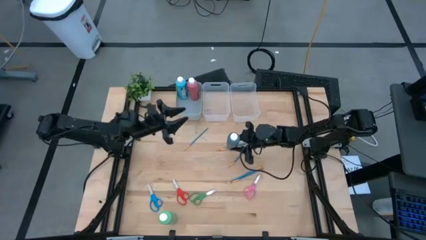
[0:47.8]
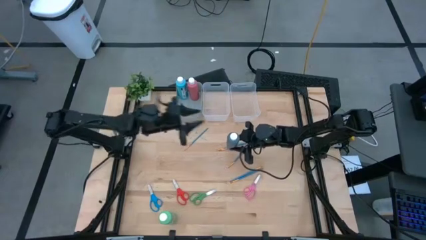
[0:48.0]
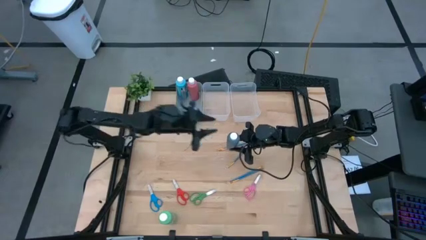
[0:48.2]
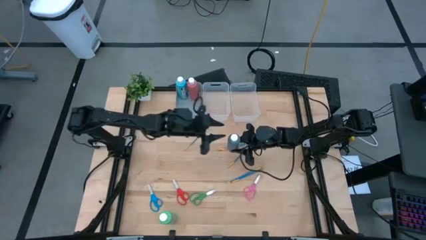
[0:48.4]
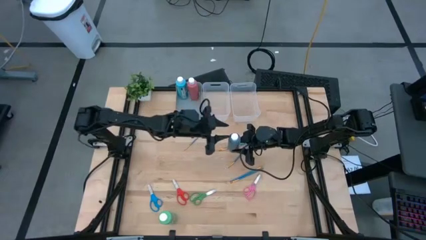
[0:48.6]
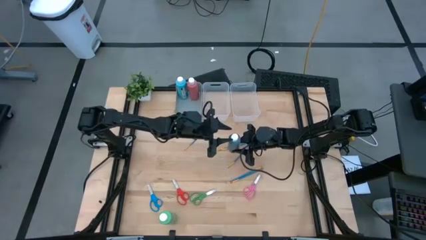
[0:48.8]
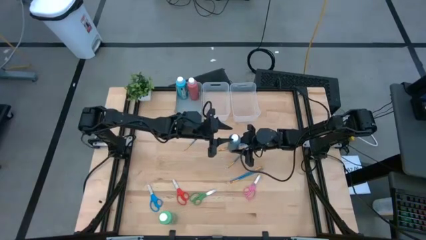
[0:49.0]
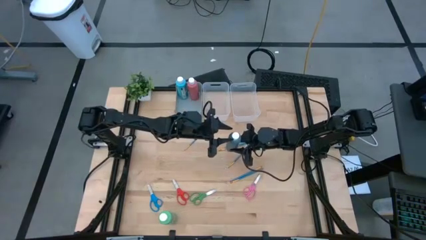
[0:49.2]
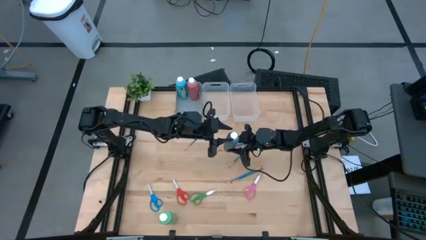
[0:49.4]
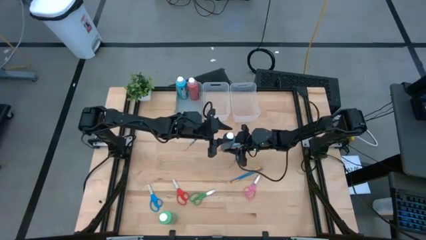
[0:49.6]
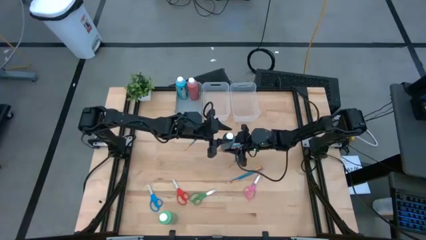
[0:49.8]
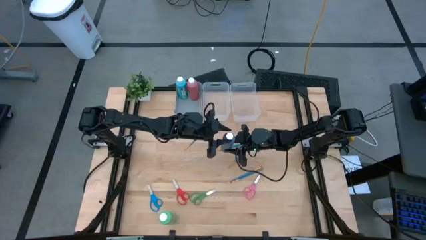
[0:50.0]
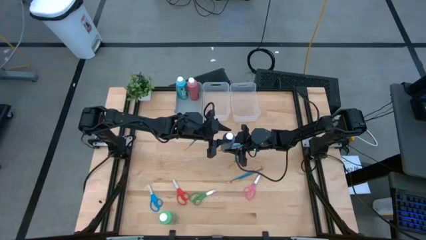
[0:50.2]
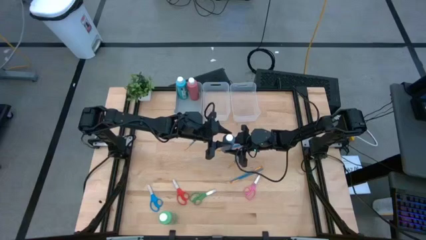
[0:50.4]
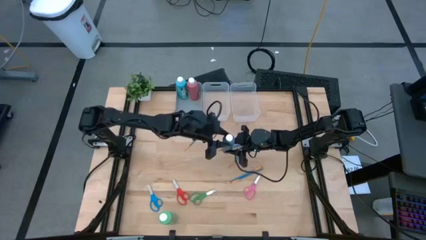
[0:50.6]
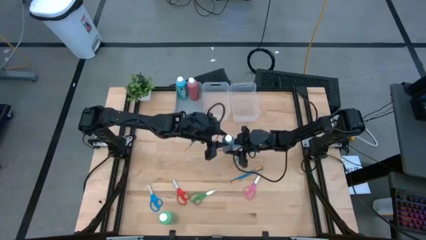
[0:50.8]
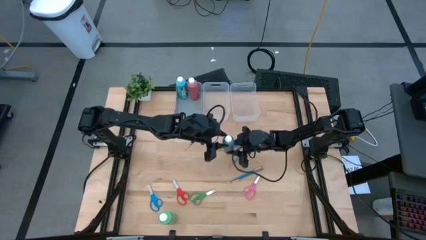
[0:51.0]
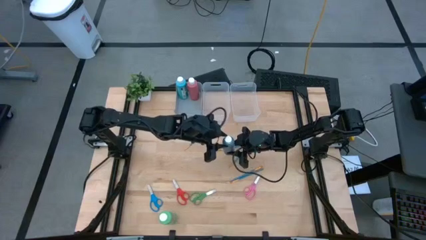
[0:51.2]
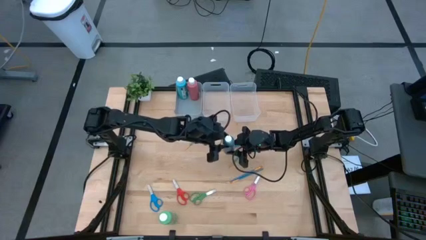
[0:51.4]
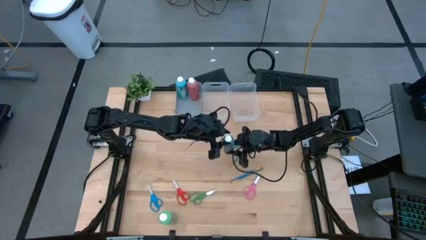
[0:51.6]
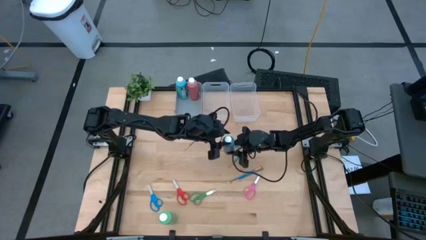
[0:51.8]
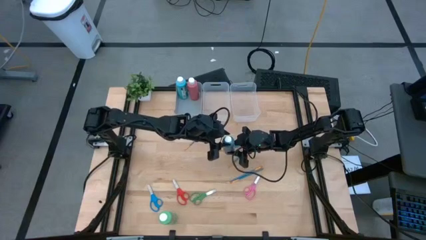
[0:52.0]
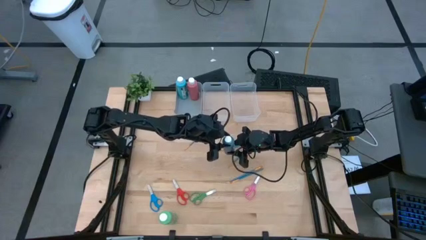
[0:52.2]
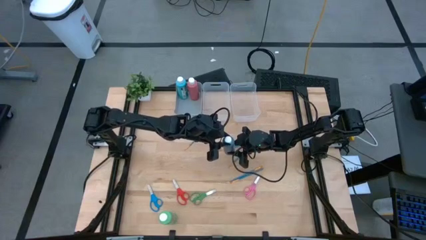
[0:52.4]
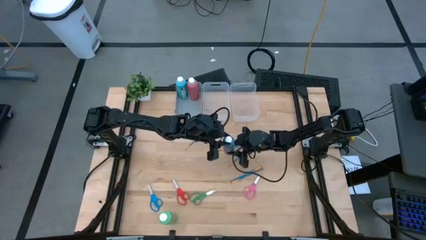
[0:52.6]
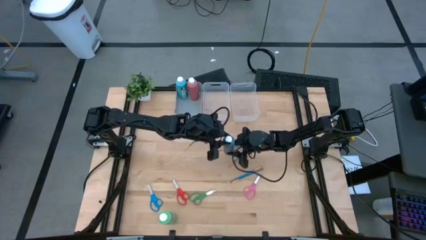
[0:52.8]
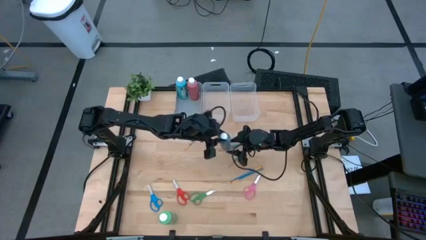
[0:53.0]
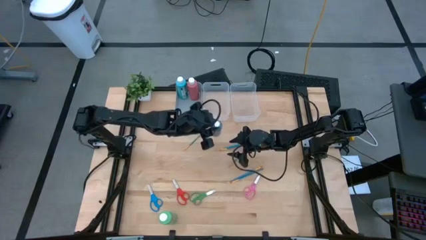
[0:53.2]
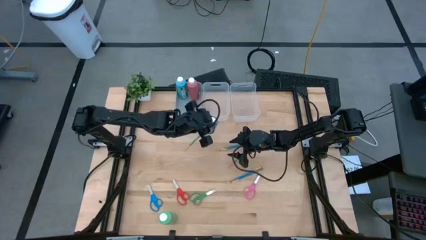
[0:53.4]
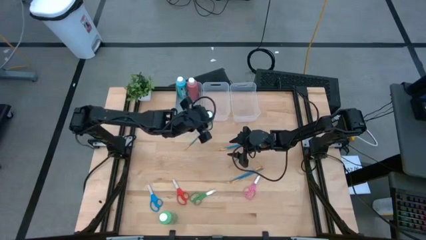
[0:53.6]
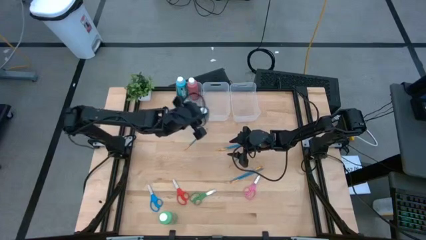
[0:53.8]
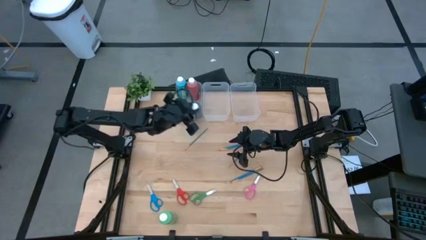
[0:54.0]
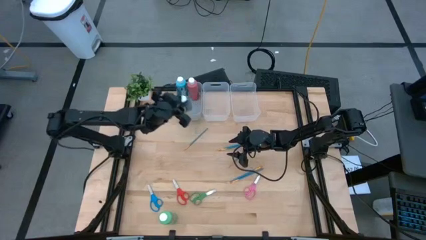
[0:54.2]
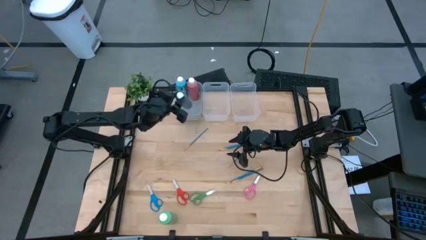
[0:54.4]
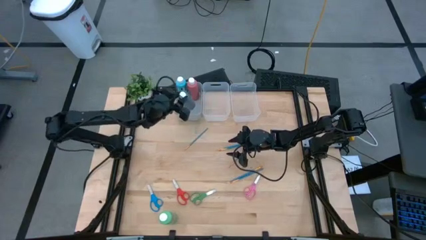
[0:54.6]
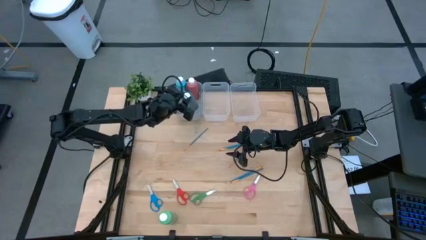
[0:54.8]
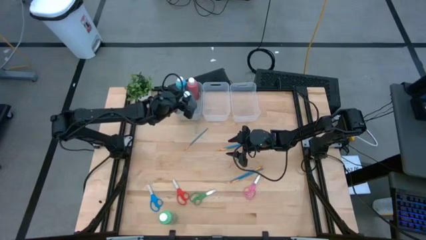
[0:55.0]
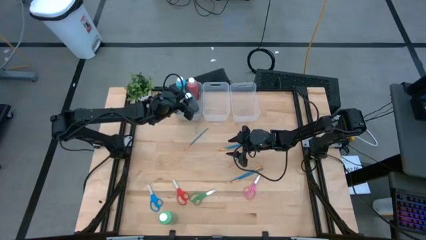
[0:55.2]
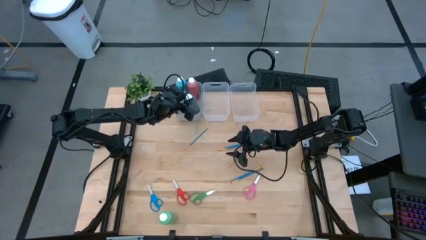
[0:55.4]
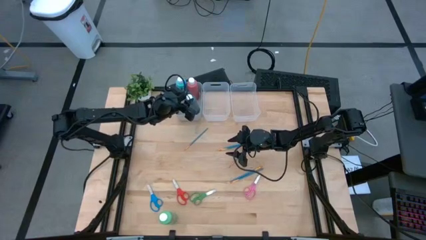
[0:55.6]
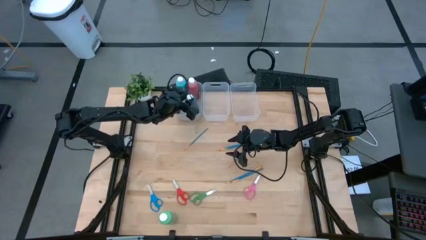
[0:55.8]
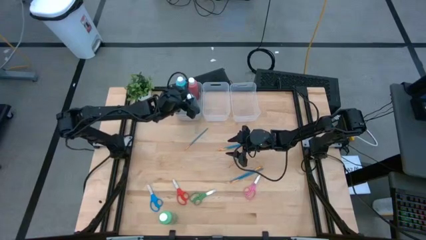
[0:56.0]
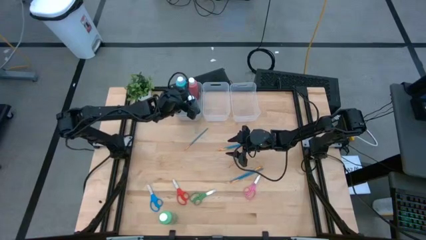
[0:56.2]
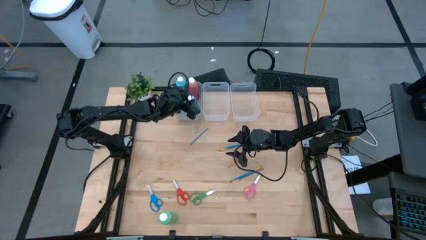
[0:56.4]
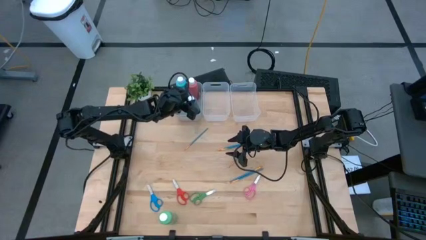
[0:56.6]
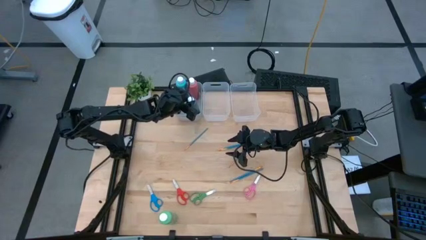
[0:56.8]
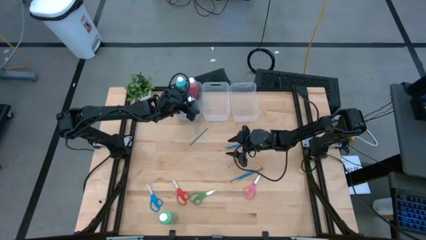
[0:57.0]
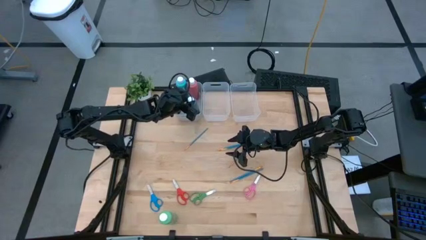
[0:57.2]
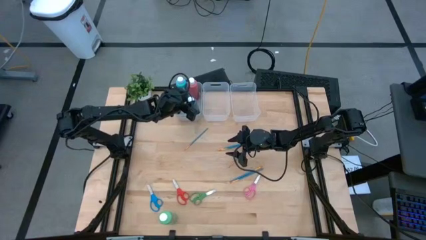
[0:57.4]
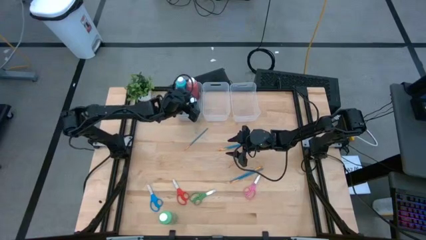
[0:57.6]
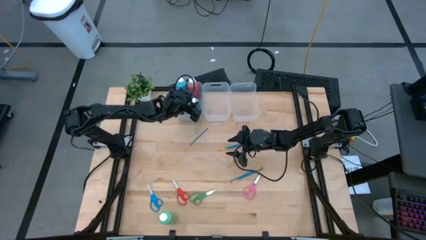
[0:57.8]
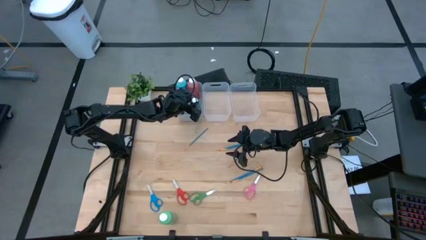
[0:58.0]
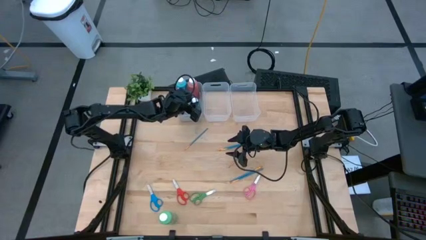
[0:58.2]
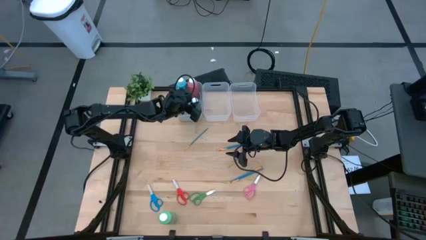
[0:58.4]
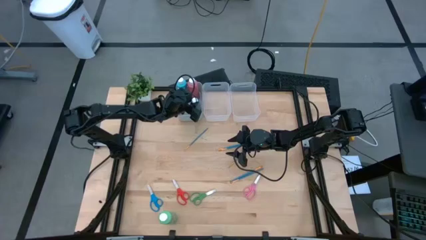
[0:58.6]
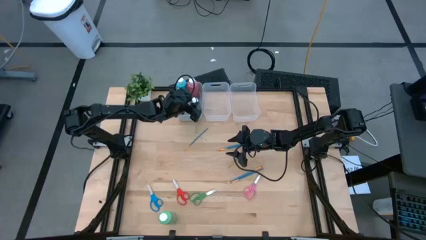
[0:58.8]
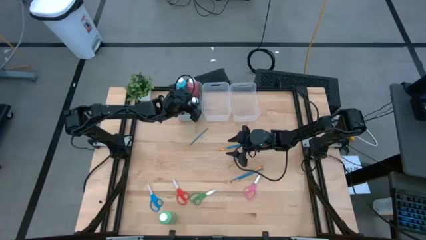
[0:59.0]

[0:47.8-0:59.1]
Task: Pick & Place Paint Supplies
Put the black paint bottles into the gray bin
